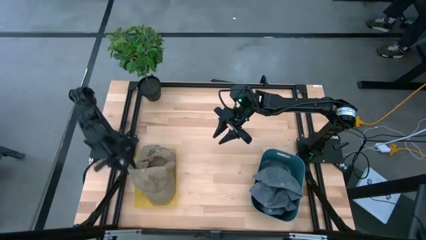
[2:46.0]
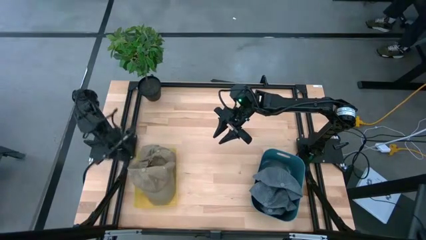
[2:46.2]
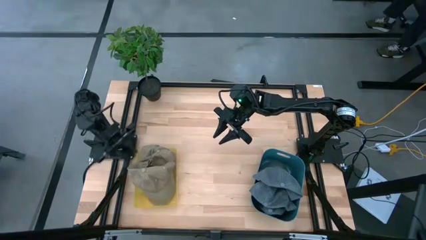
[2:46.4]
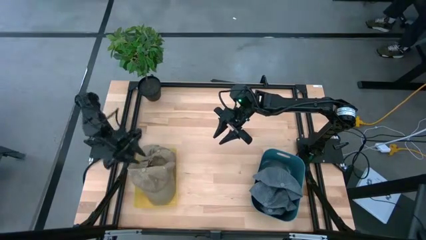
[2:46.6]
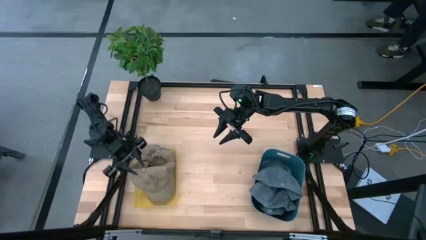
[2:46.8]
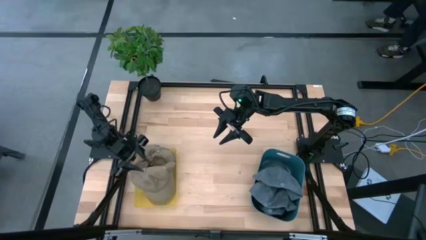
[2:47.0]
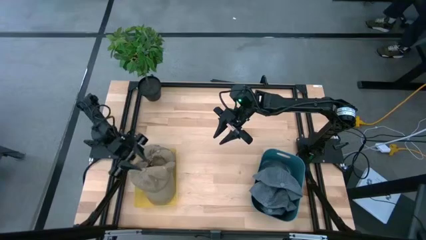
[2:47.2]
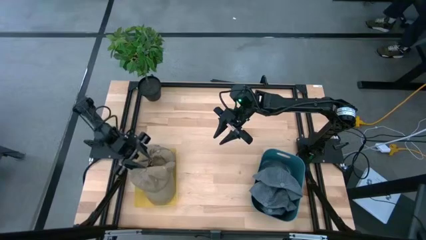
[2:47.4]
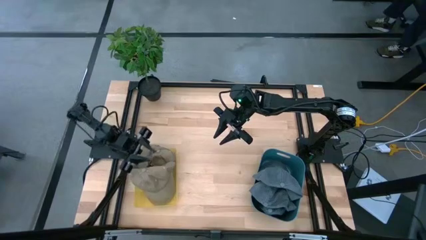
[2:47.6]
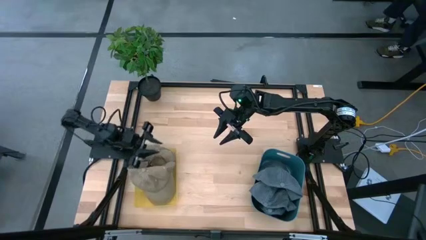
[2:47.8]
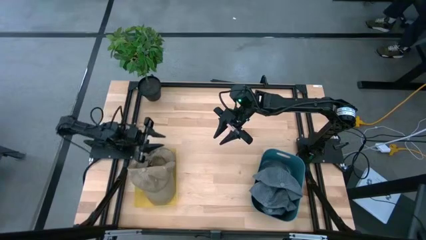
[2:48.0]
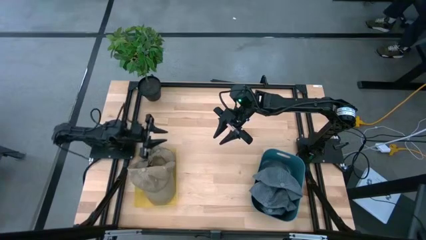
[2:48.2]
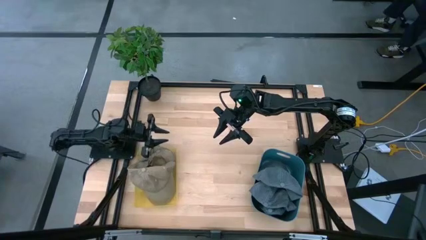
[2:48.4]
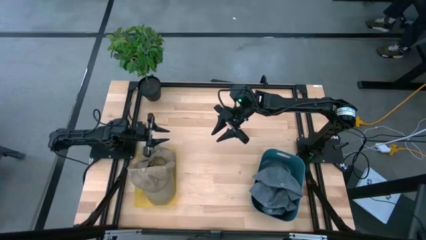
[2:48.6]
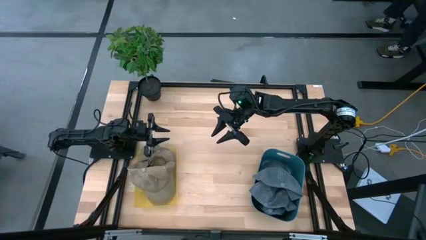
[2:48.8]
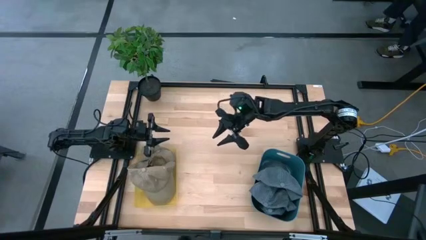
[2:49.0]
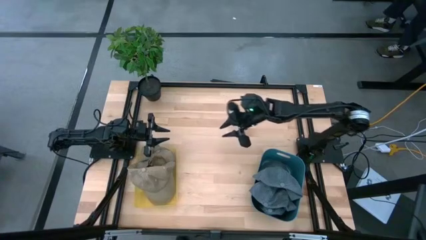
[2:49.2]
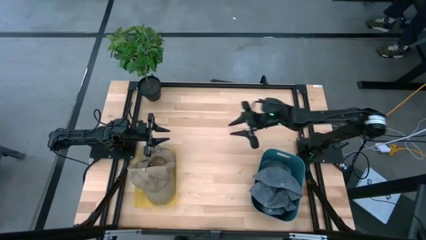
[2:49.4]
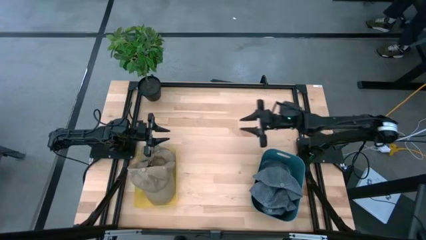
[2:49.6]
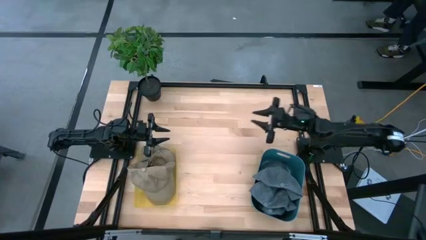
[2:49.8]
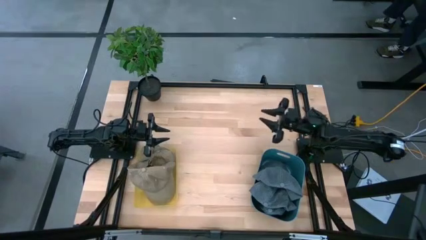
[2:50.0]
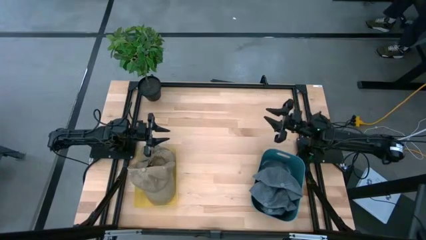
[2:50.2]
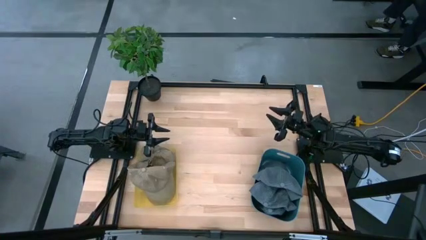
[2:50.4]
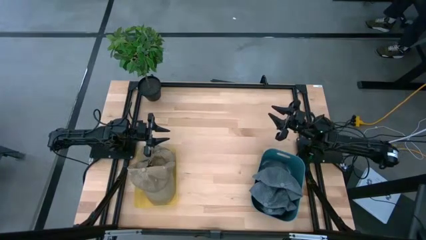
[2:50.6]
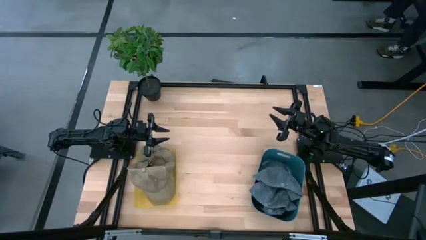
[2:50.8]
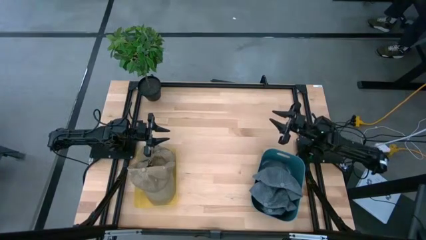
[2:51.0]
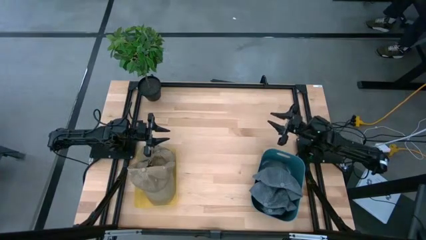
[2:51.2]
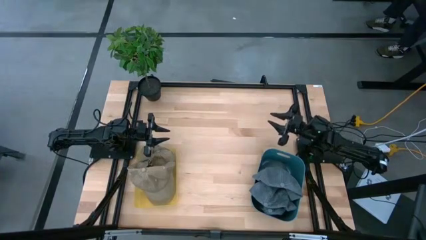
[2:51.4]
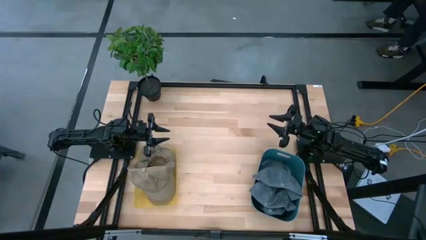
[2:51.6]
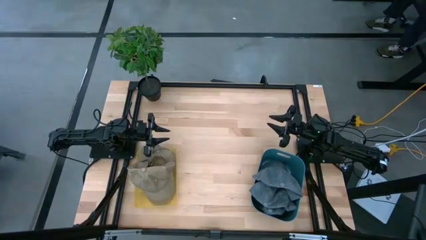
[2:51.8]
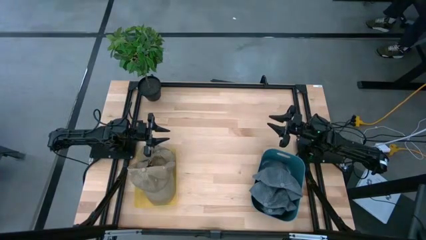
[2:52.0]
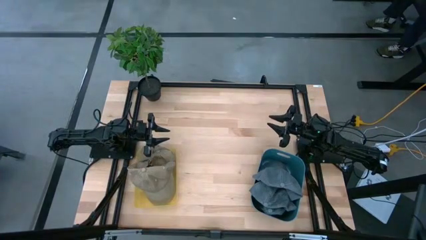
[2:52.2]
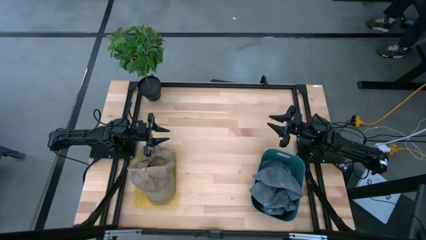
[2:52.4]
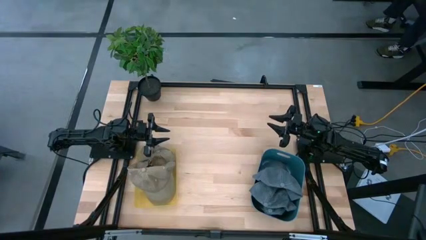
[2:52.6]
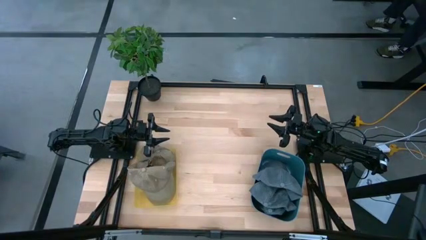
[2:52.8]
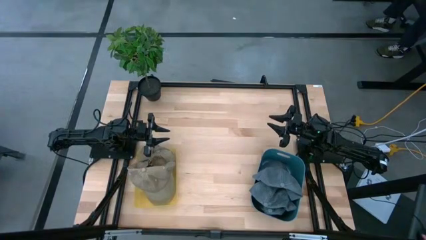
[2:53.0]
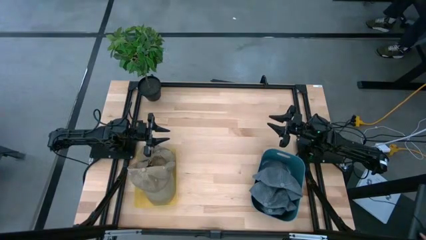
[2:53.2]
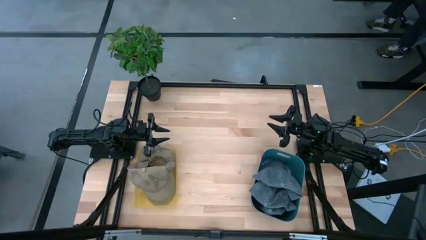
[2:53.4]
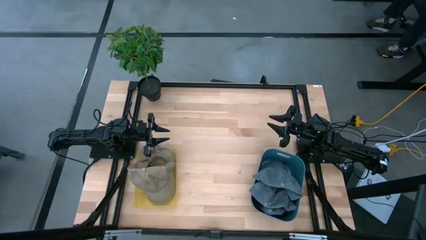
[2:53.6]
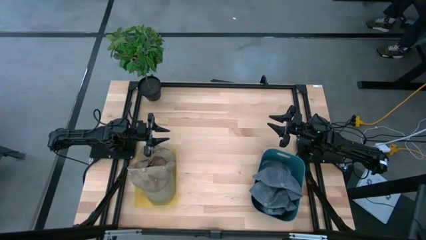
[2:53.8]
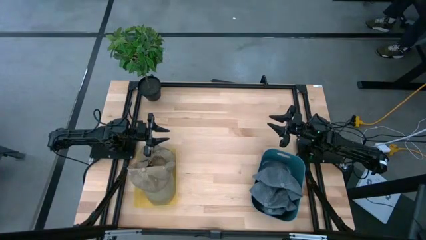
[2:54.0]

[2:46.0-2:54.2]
Task: Pick & Place hat
Return to Home Position

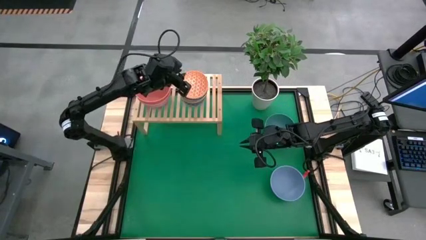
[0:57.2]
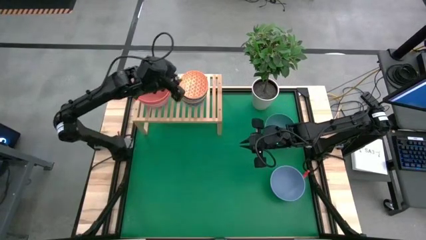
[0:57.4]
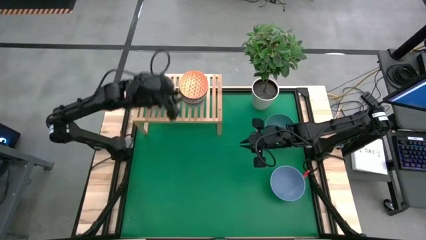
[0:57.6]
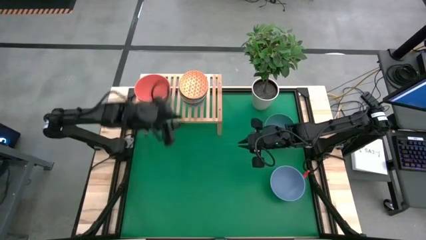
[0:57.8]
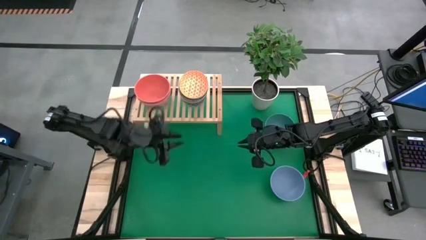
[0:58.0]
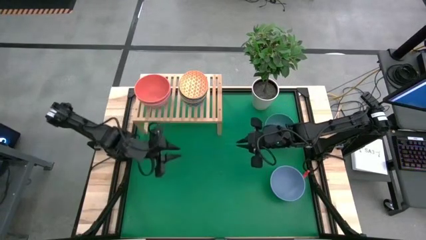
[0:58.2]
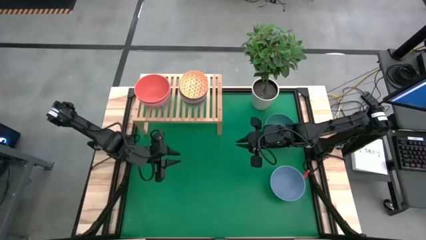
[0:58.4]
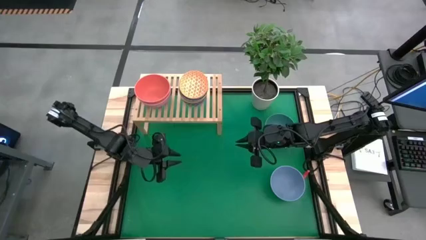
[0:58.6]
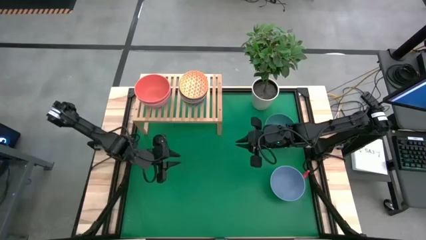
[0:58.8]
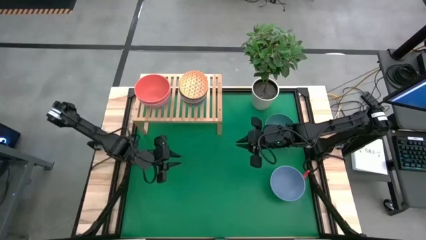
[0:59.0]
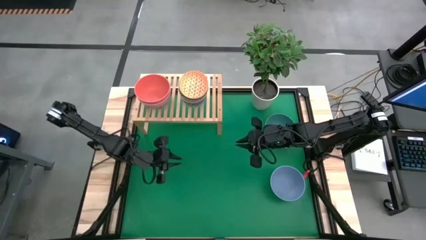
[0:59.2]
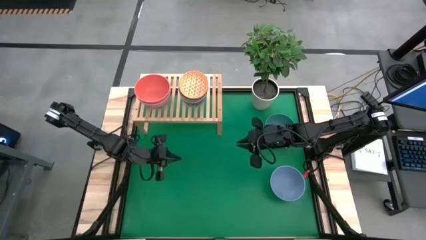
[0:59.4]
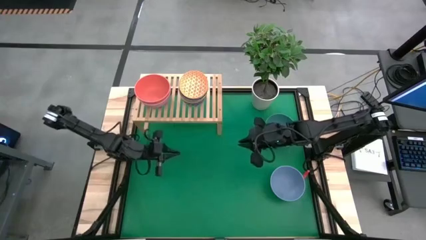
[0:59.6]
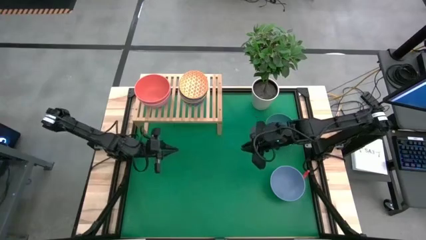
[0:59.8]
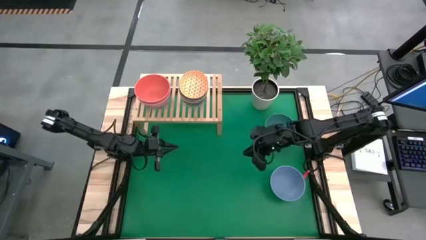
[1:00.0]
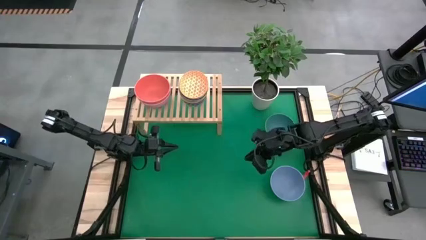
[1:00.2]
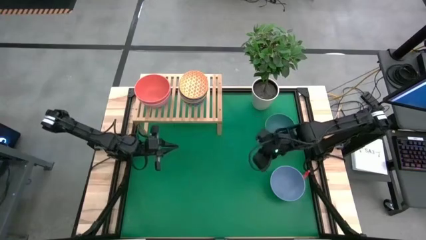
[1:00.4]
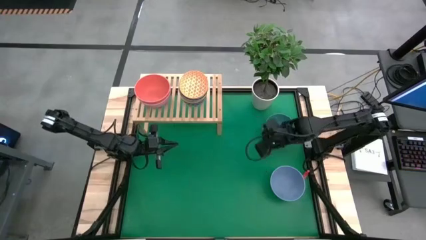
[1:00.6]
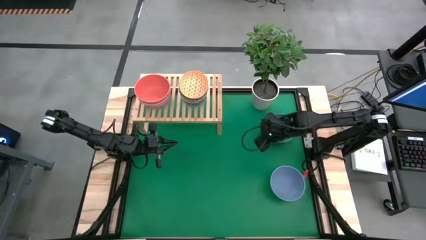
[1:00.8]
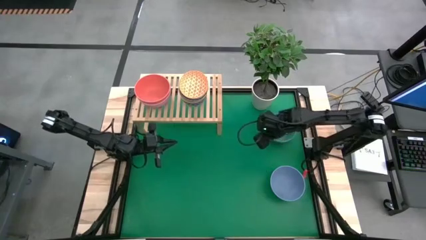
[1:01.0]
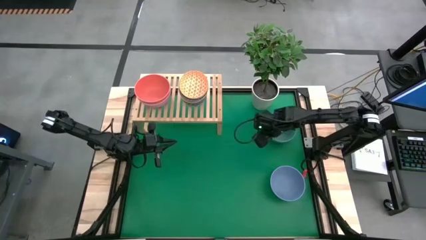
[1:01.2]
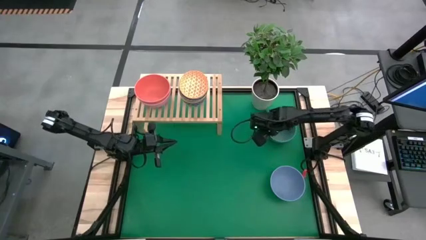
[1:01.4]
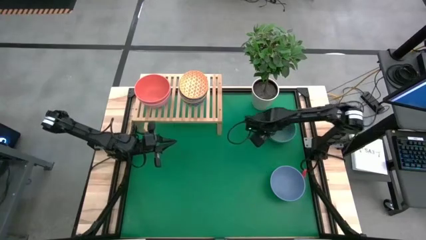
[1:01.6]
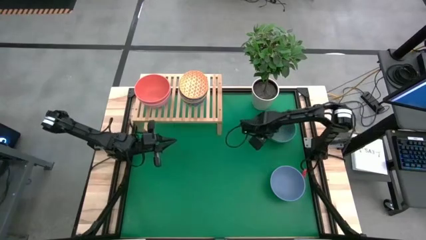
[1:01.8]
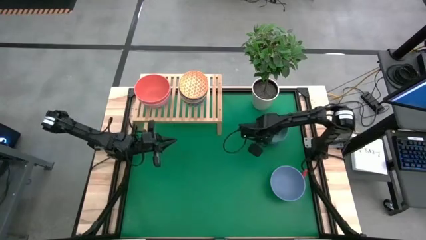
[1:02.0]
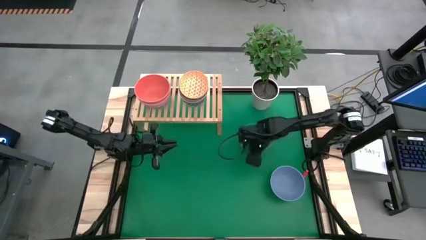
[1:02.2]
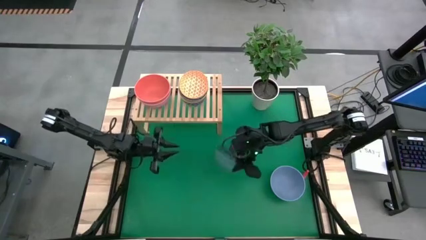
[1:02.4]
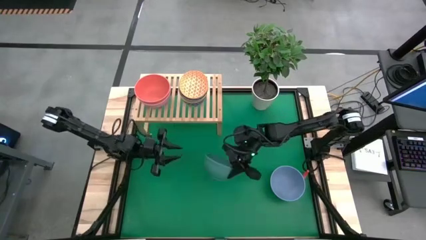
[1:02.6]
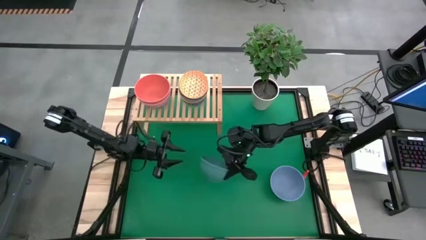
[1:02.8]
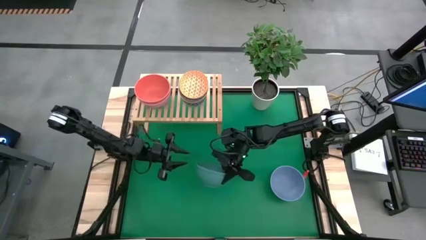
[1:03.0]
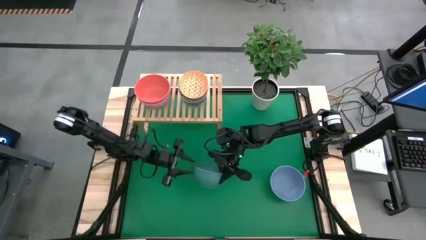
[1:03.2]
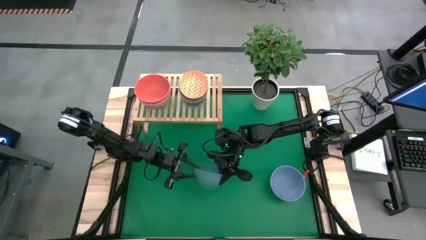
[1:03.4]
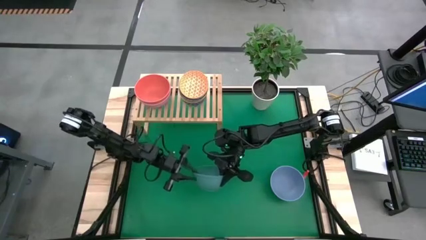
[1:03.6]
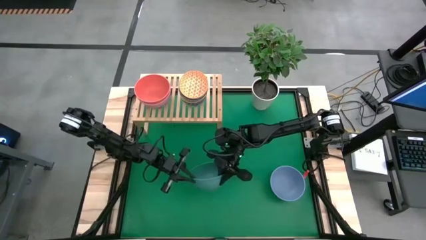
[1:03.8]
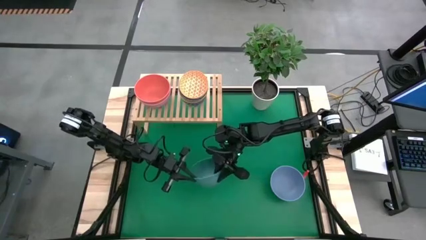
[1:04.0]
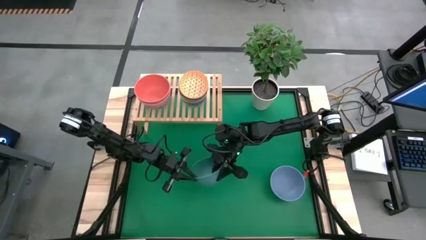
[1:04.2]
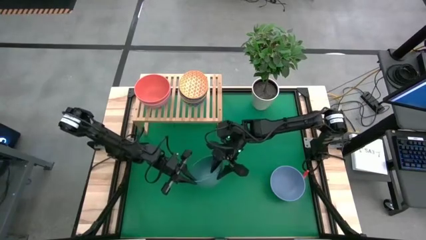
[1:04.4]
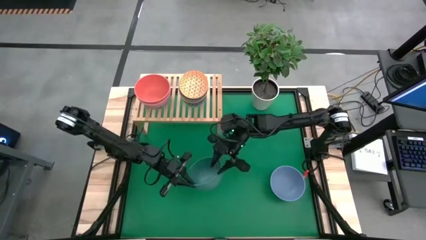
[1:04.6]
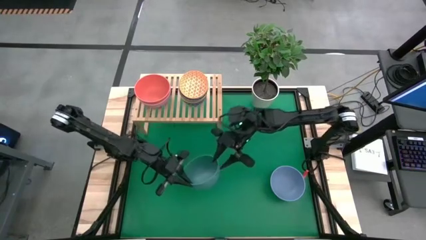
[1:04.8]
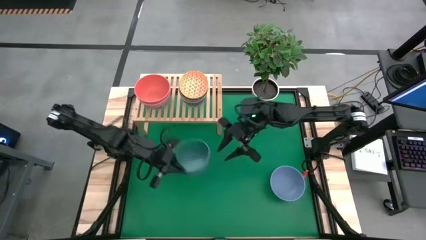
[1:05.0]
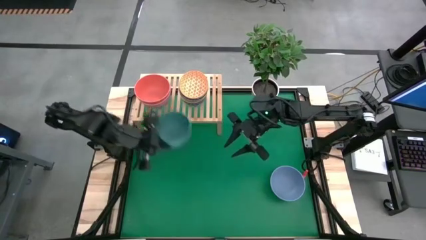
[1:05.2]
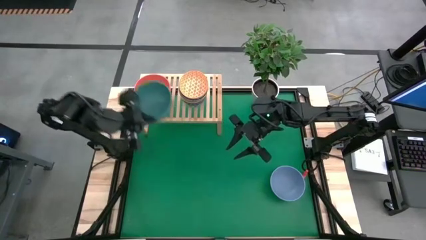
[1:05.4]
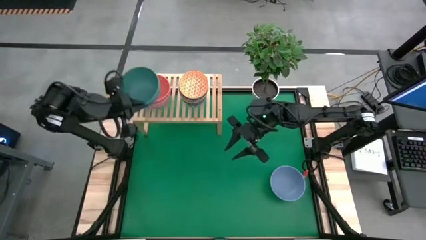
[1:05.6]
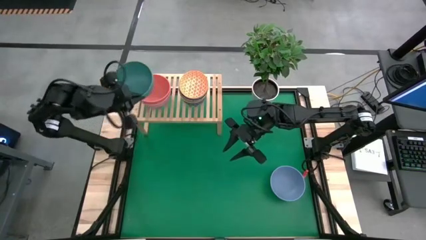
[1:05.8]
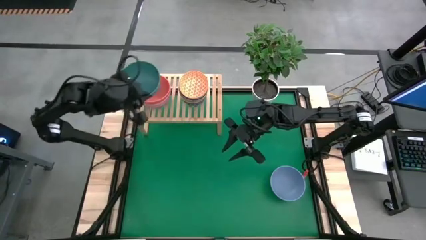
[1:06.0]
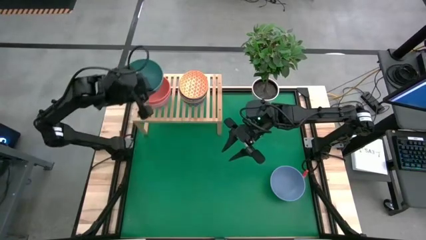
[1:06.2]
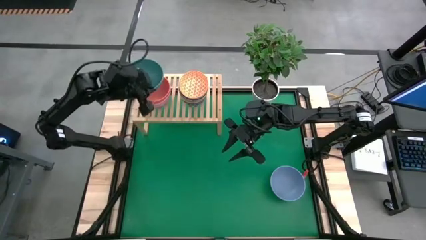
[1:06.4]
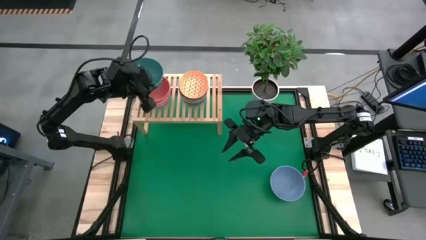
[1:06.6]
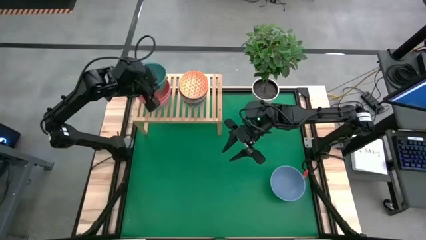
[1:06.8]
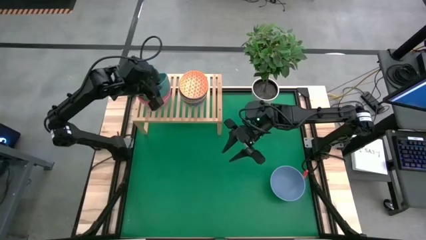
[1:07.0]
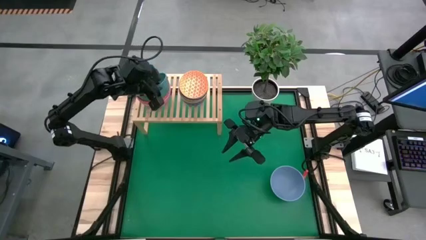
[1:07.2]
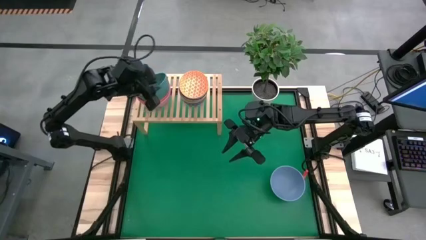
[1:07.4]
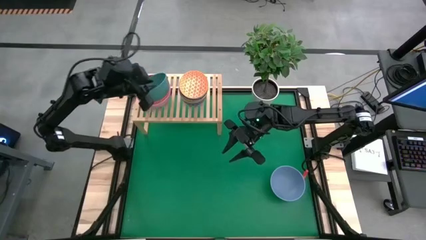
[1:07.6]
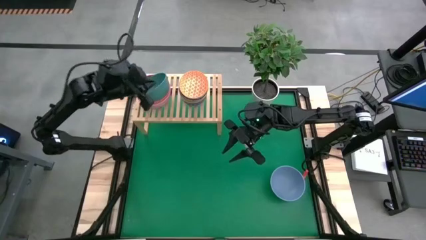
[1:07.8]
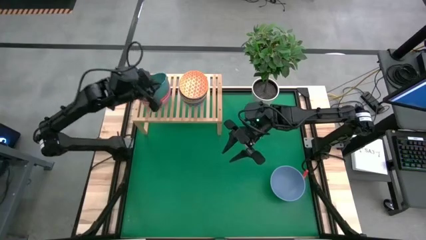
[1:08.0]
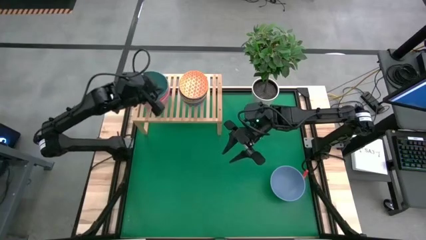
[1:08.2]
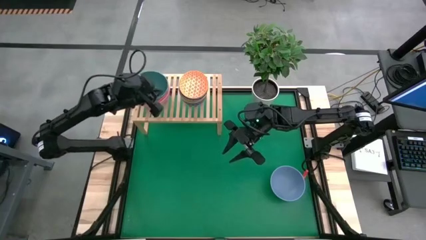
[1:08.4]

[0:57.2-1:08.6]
Task: Place and stack bowls onto a shelf
Stack the green bowl on top of the orange bowl on the shelf
